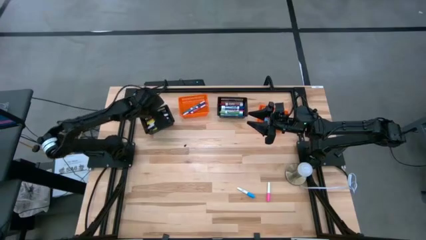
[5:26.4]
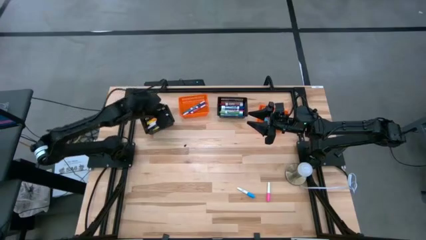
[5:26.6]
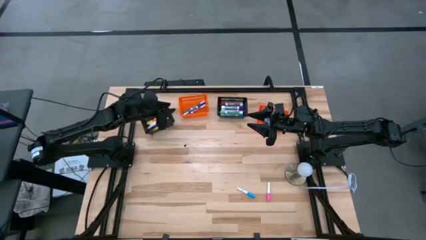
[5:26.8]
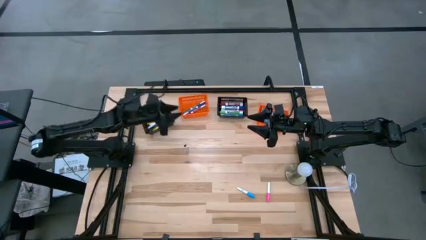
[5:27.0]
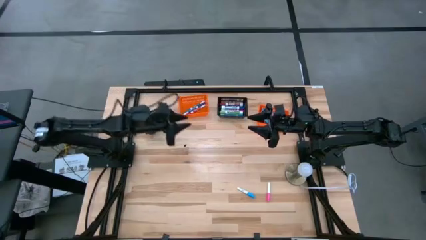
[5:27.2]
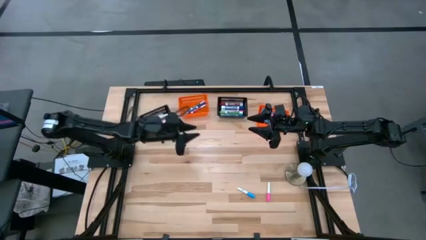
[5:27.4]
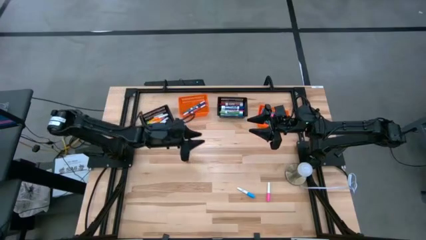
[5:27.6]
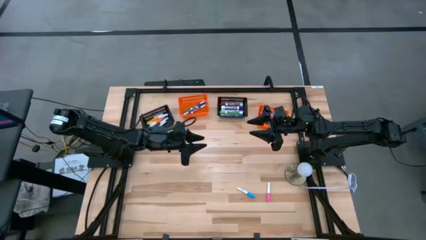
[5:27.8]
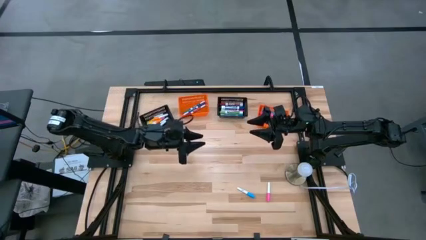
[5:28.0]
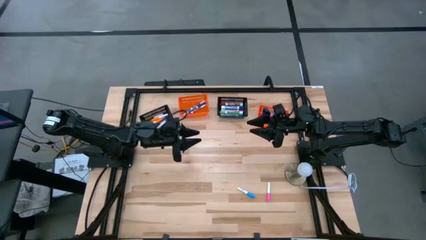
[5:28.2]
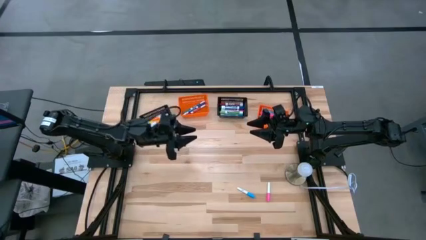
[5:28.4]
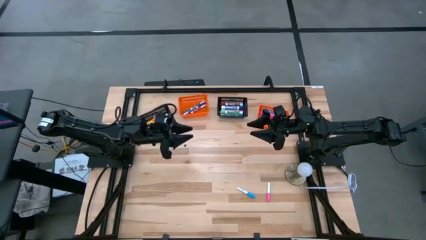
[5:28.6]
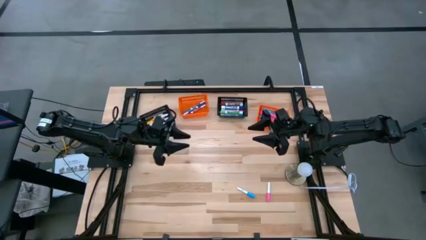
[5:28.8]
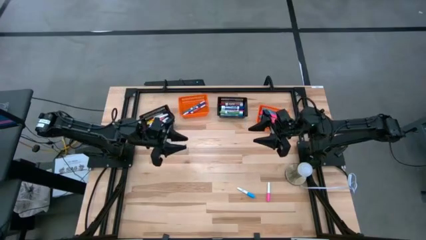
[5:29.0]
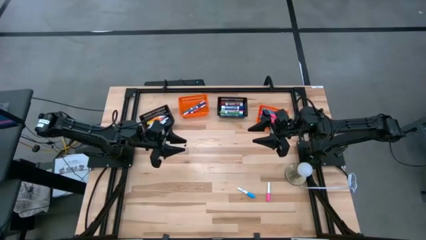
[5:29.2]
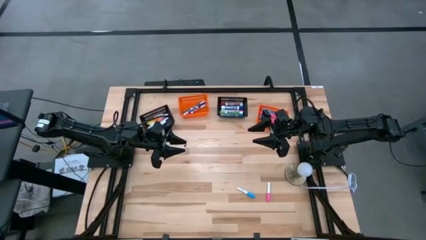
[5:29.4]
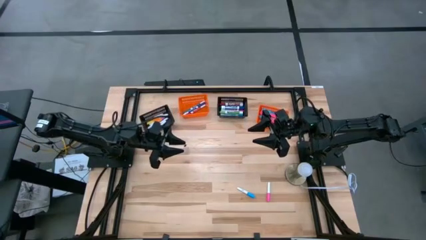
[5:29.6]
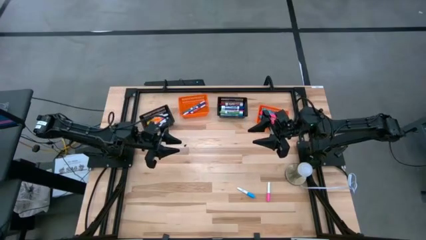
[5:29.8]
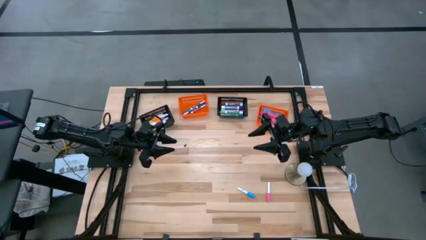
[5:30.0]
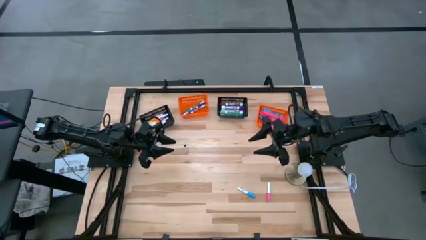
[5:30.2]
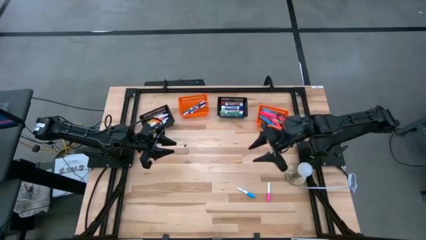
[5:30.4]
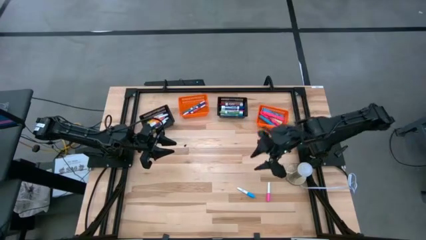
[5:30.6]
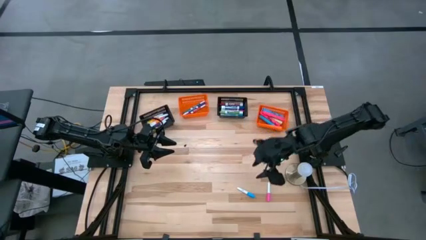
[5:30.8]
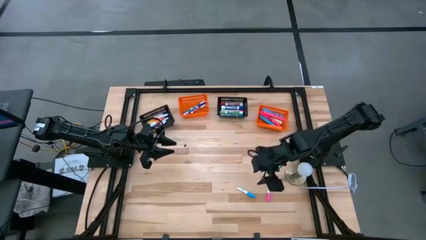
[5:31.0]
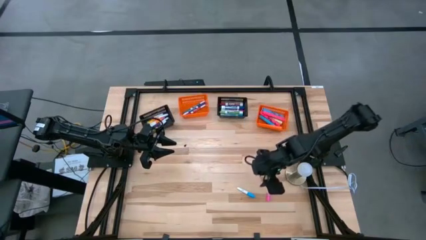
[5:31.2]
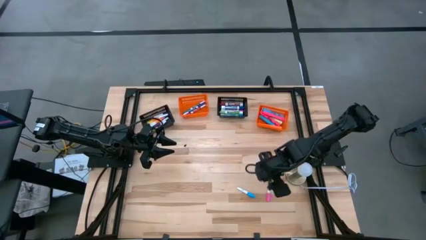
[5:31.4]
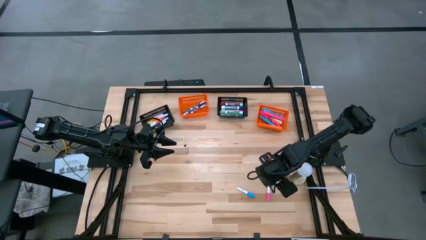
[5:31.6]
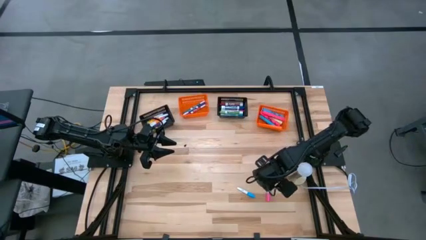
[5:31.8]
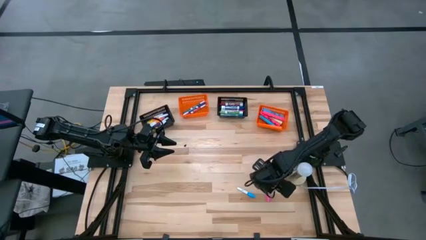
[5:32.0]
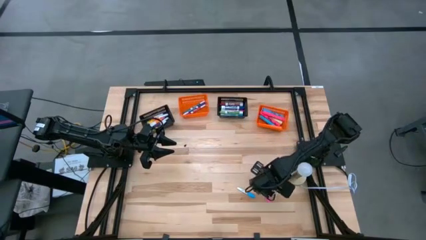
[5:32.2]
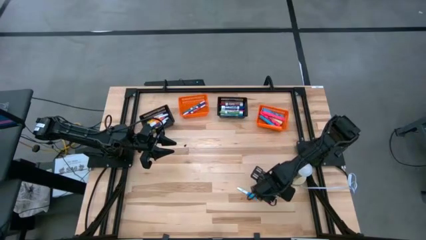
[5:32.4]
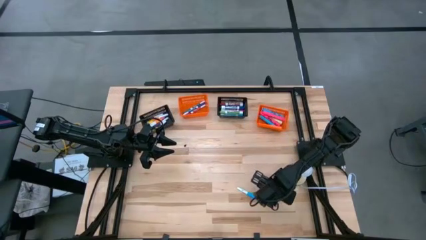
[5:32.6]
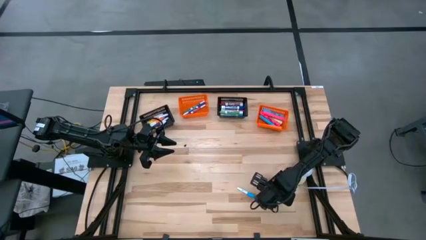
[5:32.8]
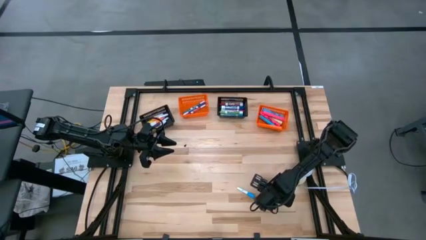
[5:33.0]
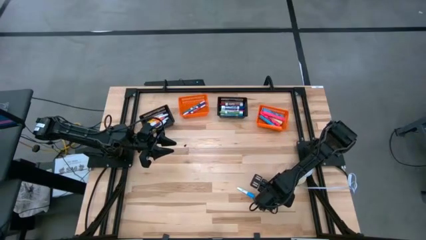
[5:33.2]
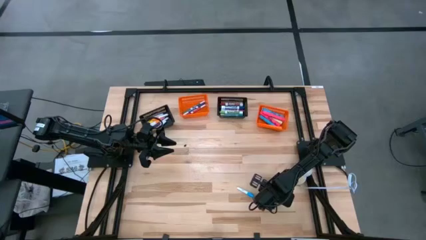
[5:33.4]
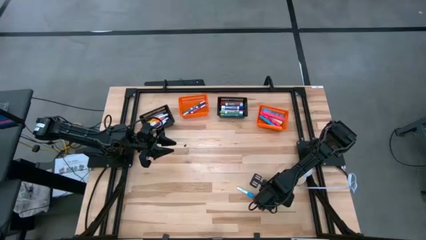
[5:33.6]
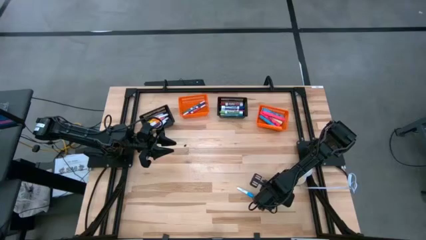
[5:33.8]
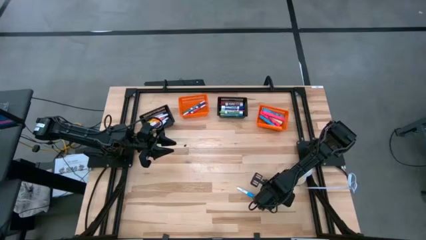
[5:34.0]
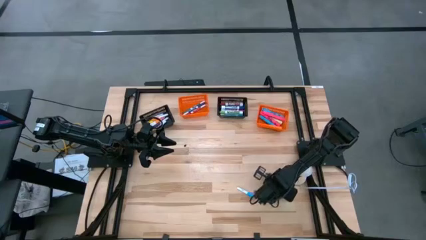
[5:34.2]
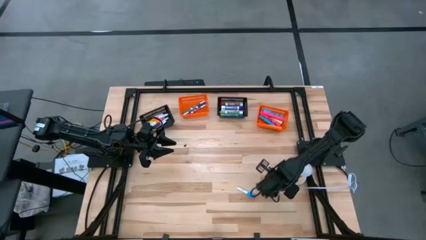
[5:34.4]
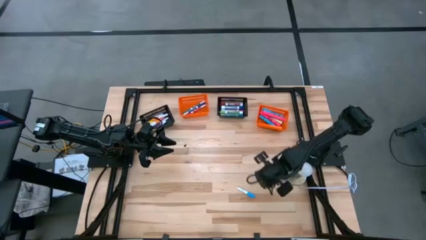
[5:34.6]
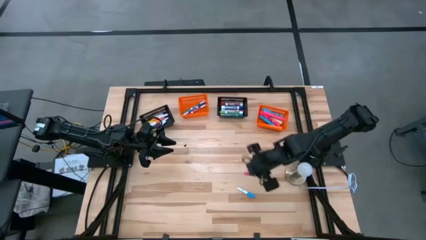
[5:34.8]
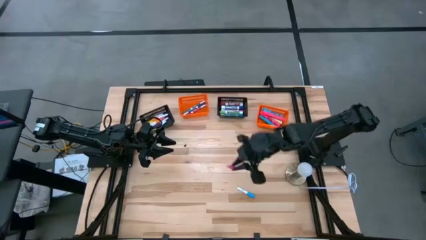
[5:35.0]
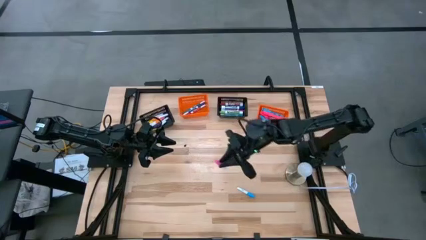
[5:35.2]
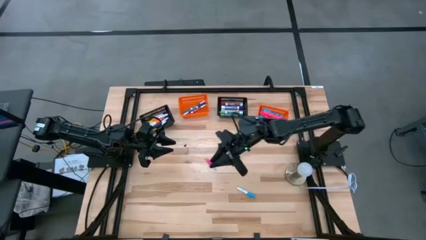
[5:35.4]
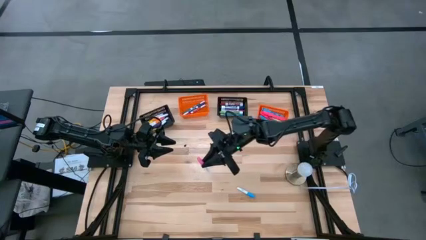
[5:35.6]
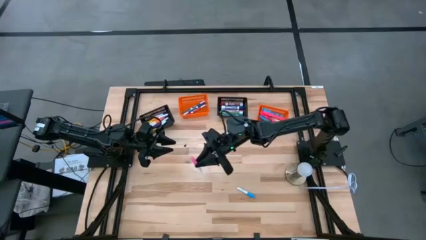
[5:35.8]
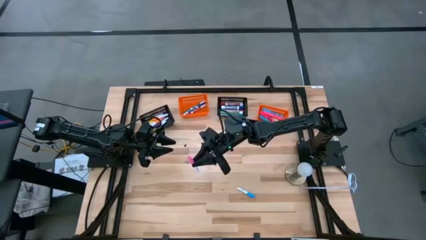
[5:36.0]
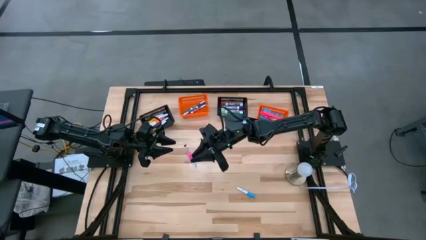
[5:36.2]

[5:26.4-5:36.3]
Task: Pick & Place Markers
Put the white pink marker into the left black bin

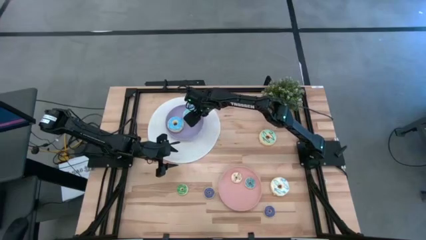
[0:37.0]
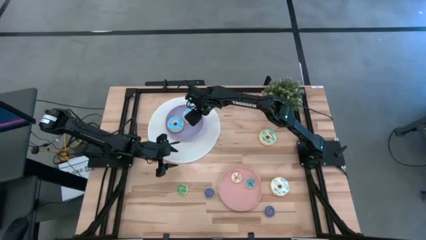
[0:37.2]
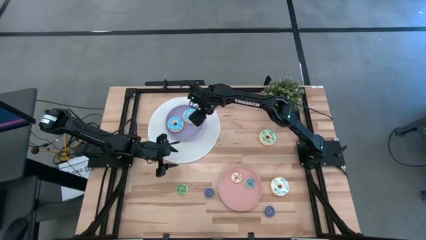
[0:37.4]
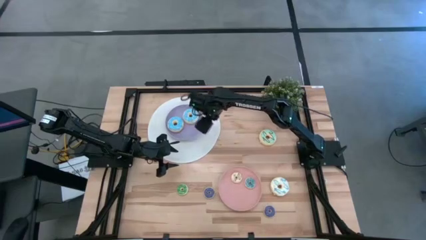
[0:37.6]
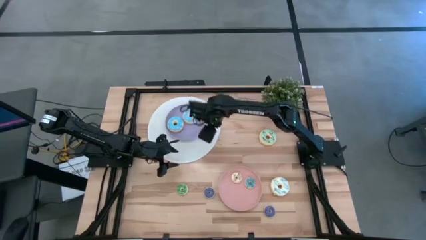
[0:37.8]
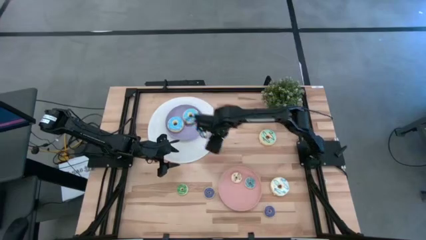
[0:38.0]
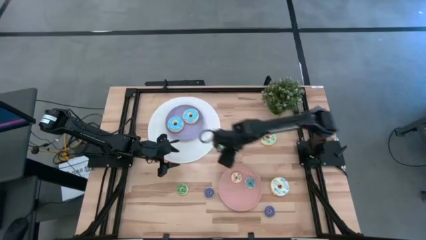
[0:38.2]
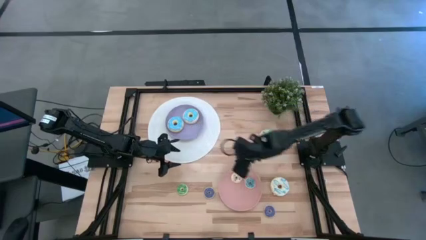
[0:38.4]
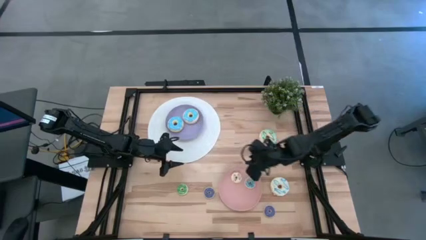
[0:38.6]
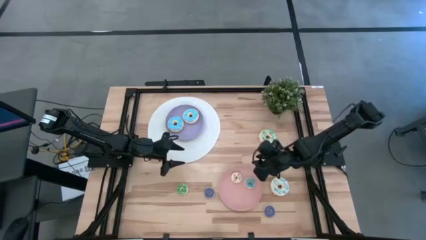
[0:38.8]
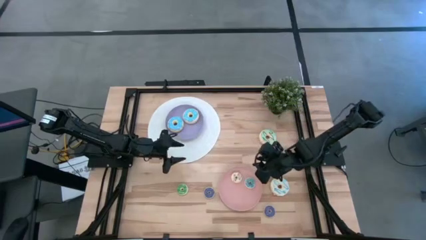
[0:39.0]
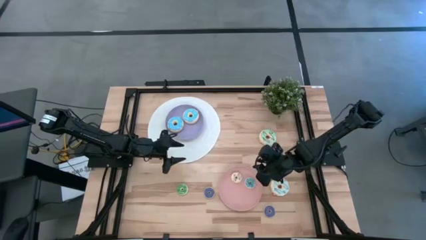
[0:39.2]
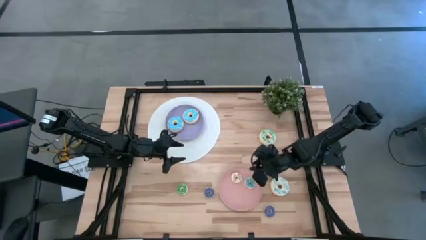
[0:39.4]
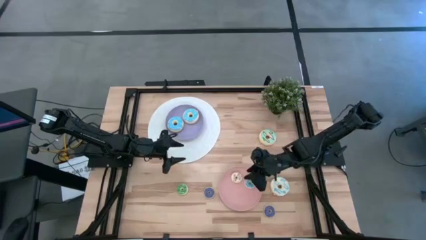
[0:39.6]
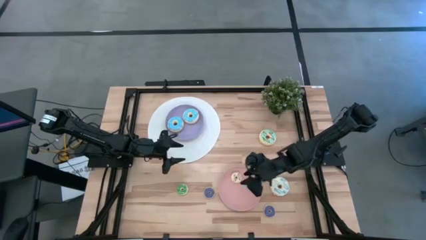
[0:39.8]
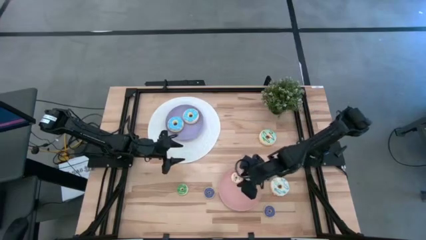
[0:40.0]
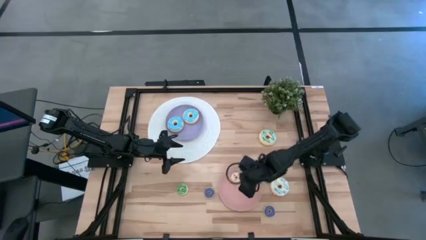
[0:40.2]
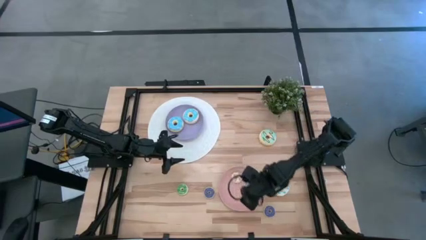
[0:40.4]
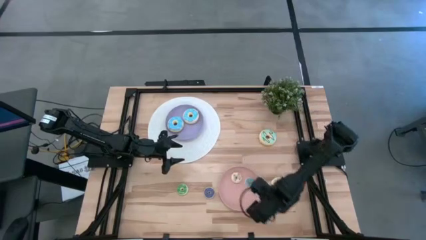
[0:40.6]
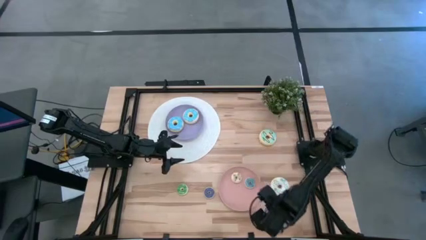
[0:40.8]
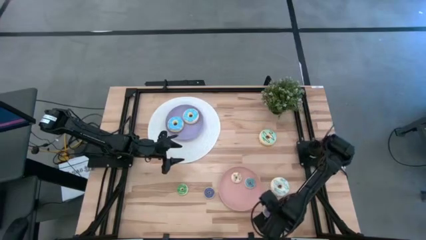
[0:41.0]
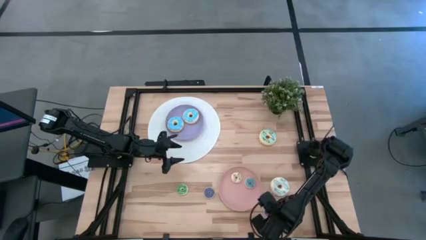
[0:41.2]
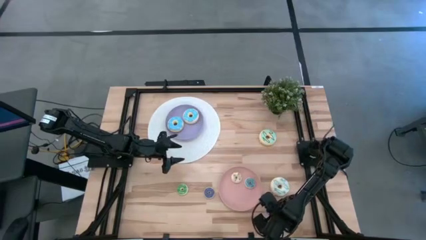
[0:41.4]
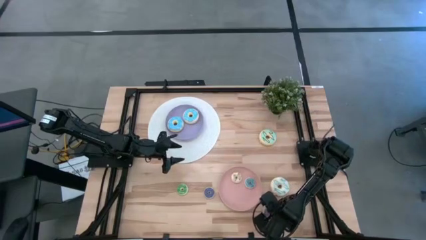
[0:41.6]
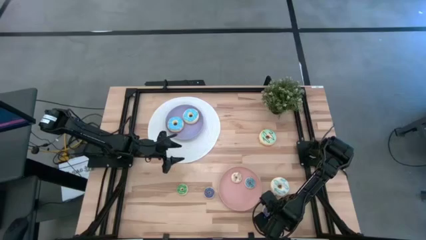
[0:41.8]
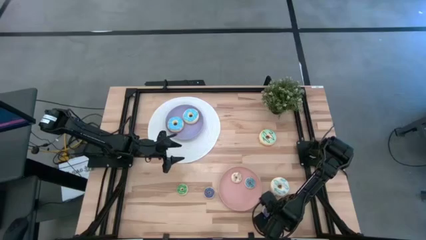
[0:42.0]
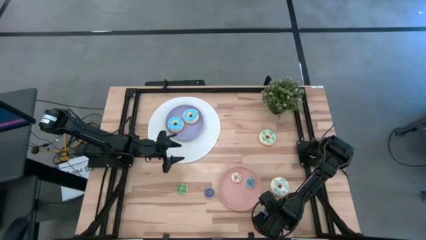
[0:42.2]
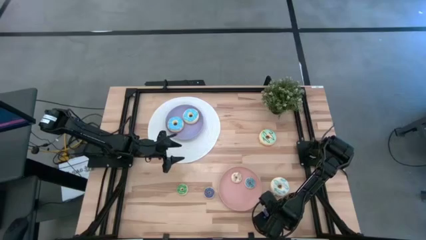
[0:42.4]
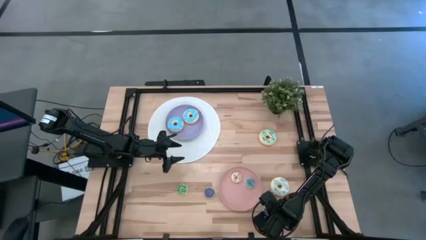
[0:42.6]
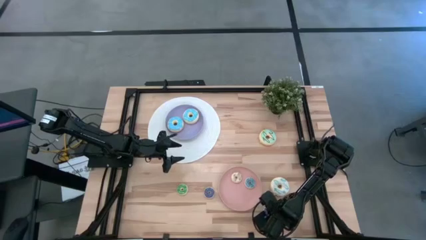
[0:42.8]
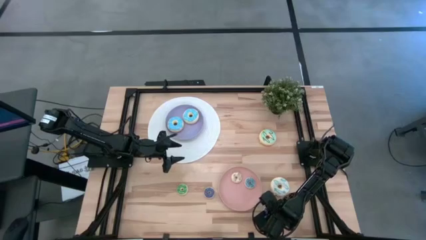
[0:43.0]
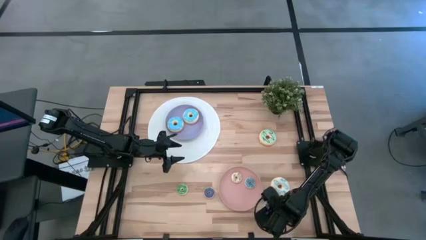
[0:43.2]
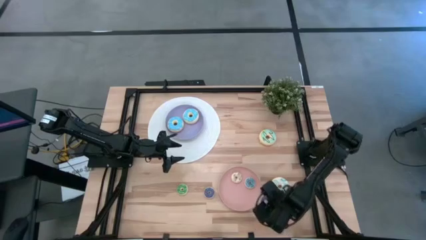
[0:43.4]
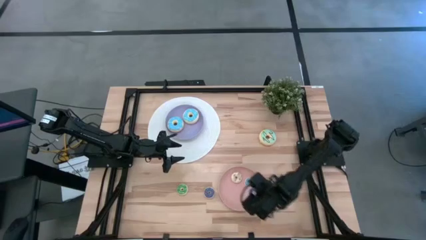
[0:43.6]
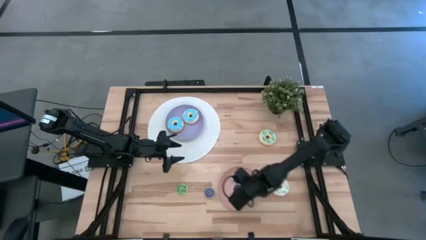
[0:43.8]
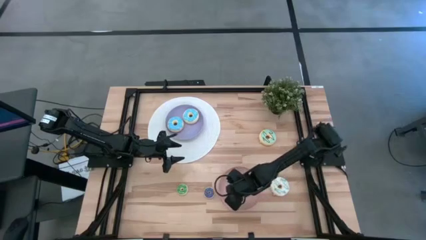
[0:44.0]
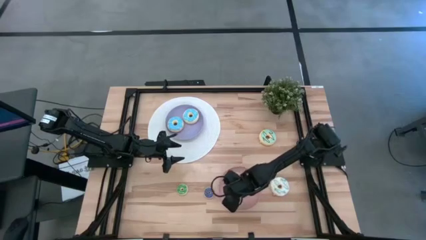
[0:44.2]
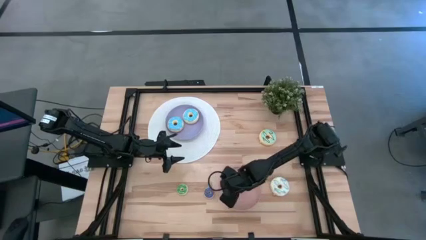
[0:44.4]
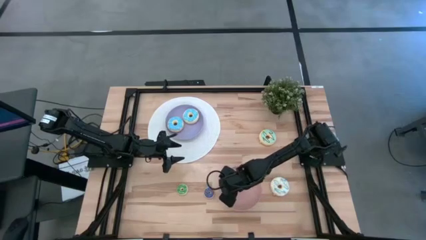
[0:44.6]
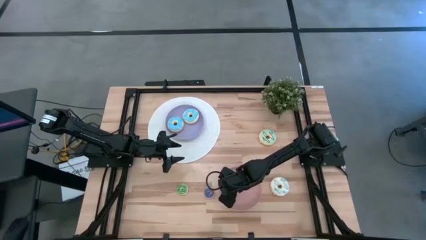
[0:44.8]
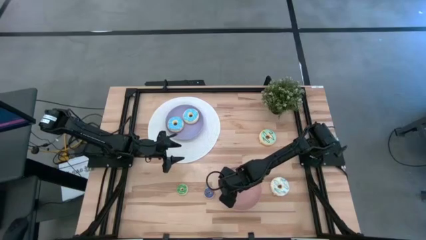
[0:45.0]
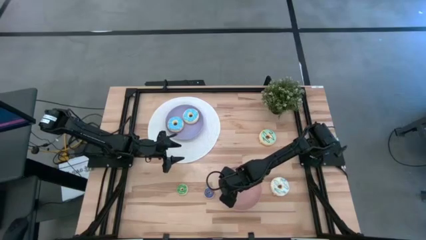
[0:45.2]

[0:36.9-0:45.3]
Task: Pick & Place donuts
Put the small blue donut on the pink plate
